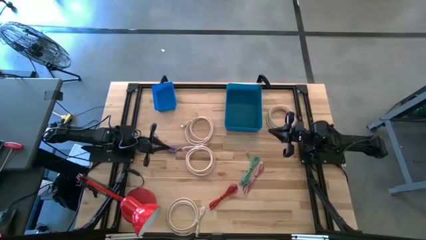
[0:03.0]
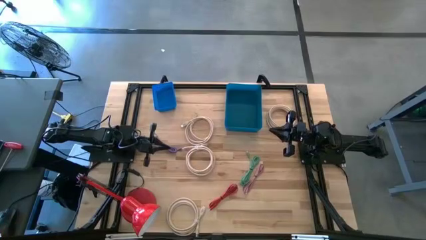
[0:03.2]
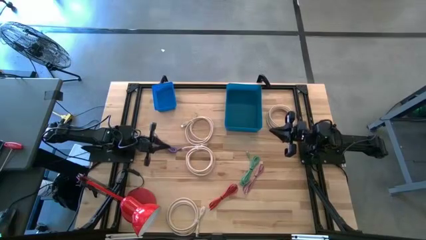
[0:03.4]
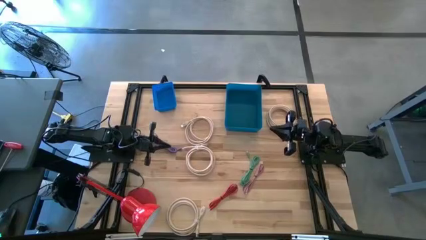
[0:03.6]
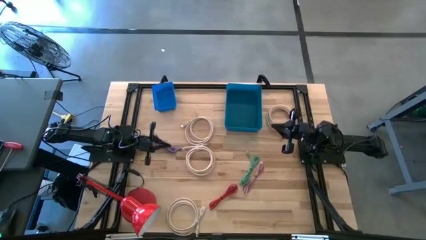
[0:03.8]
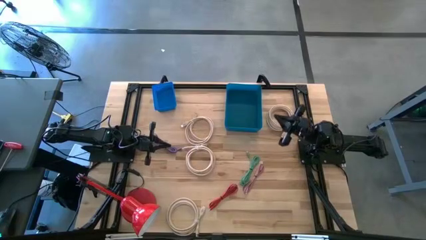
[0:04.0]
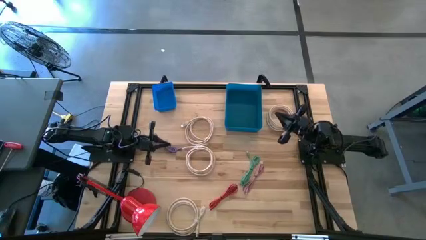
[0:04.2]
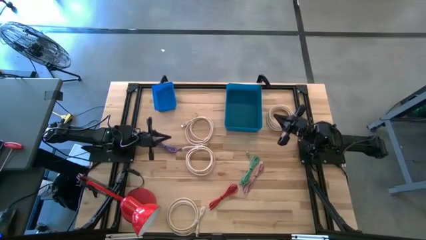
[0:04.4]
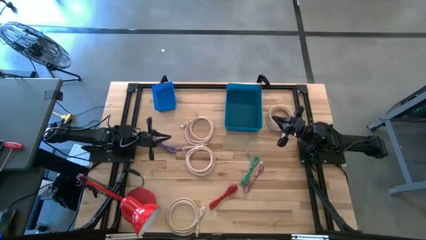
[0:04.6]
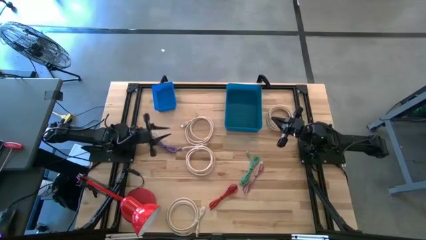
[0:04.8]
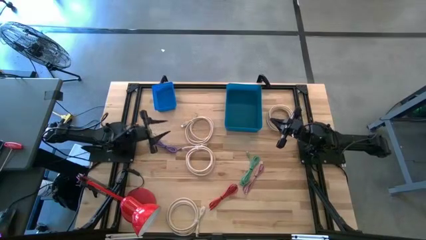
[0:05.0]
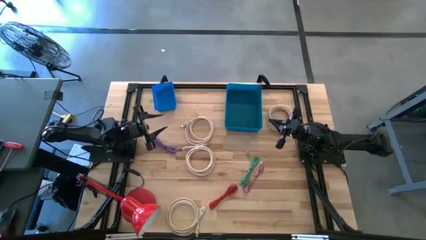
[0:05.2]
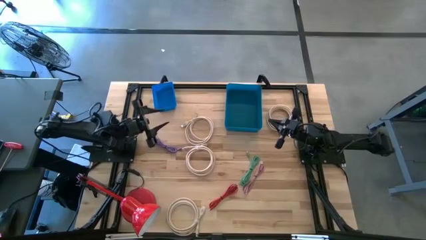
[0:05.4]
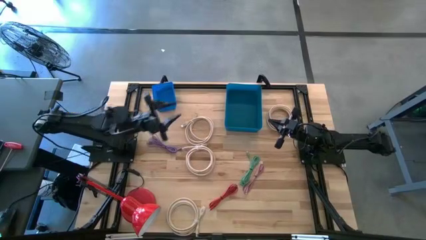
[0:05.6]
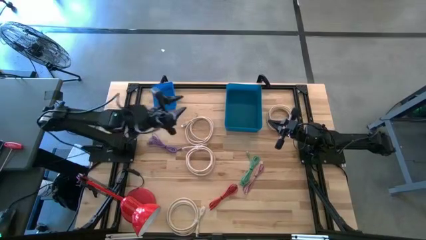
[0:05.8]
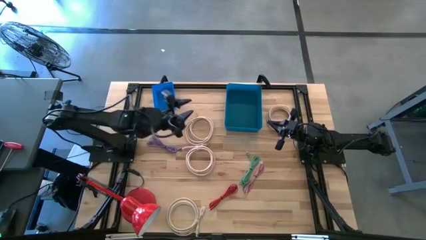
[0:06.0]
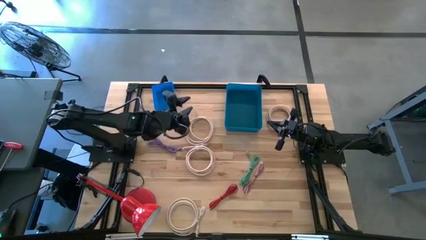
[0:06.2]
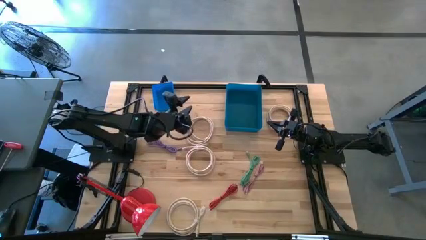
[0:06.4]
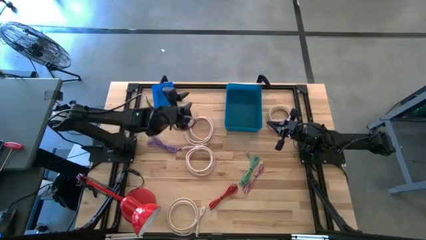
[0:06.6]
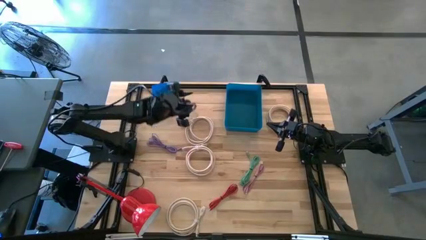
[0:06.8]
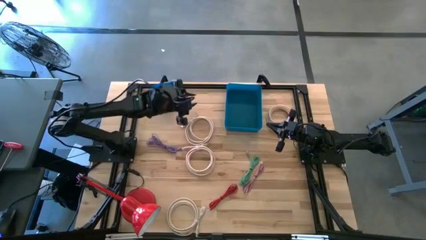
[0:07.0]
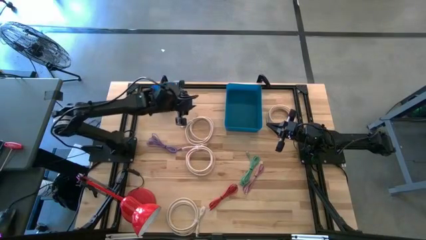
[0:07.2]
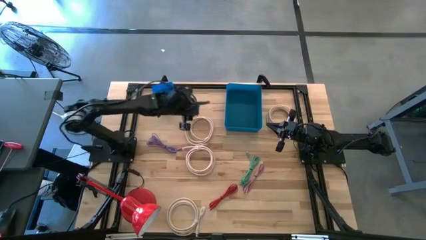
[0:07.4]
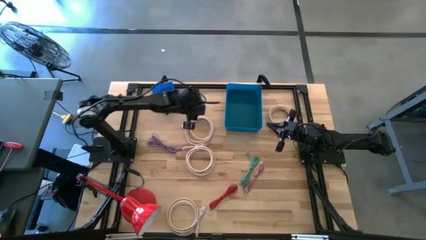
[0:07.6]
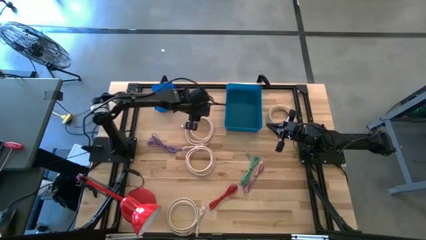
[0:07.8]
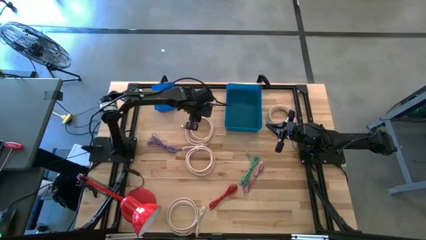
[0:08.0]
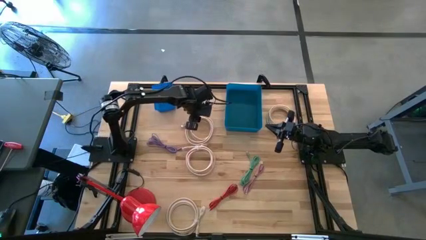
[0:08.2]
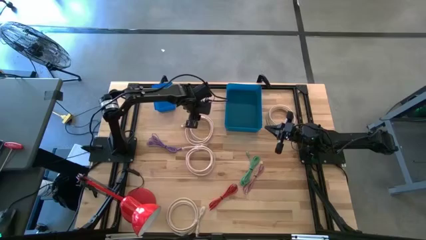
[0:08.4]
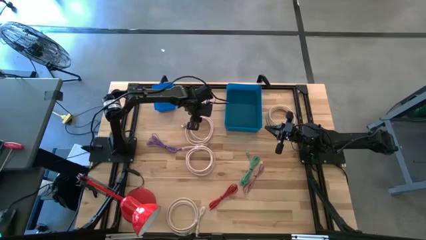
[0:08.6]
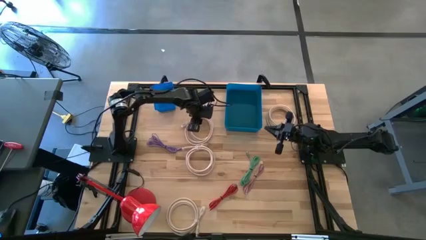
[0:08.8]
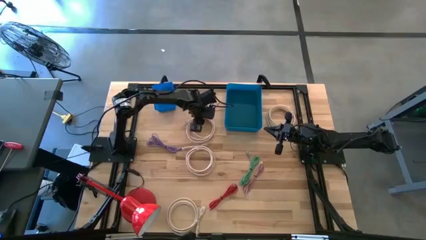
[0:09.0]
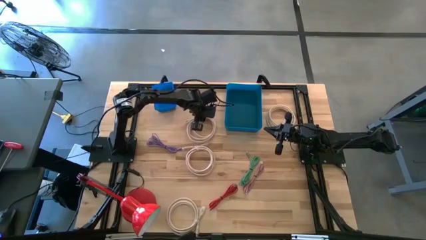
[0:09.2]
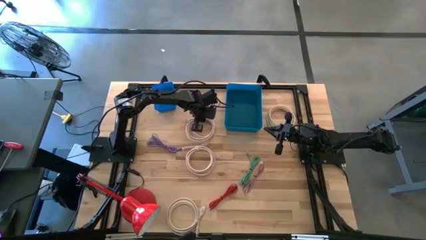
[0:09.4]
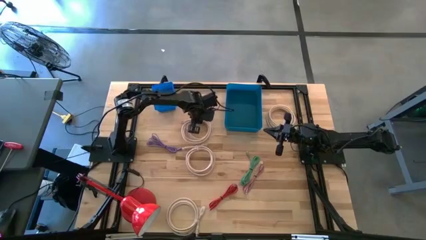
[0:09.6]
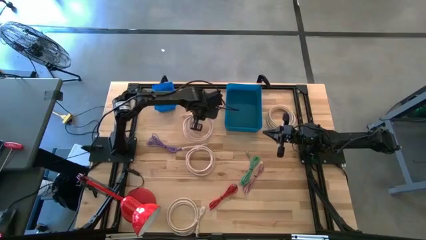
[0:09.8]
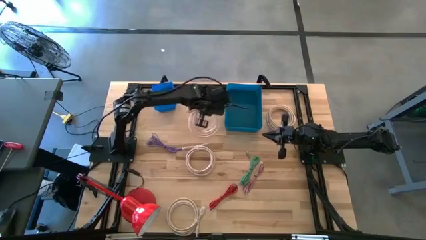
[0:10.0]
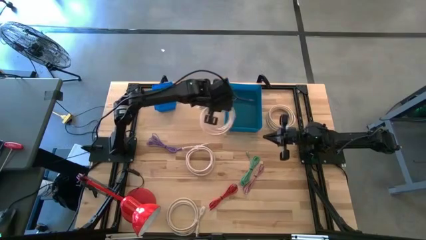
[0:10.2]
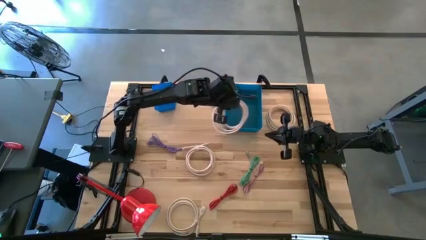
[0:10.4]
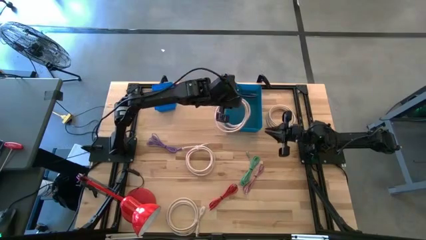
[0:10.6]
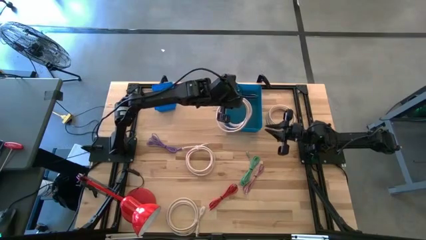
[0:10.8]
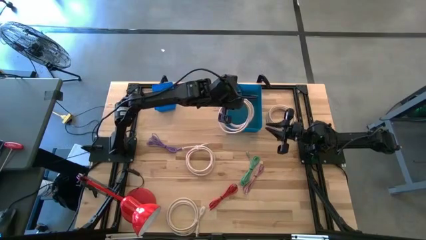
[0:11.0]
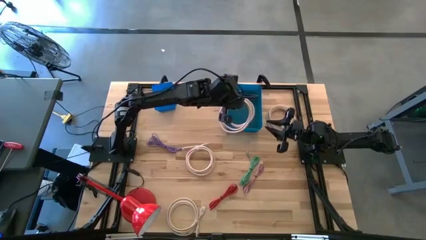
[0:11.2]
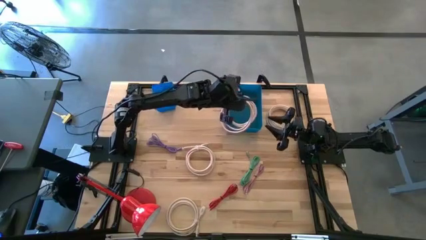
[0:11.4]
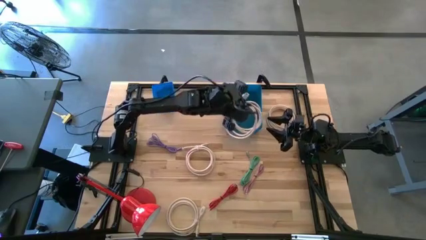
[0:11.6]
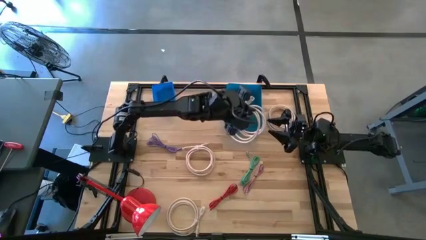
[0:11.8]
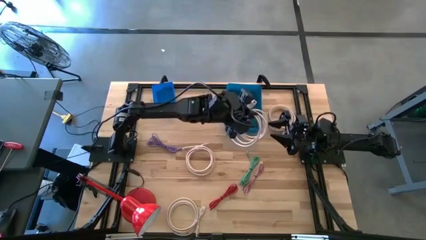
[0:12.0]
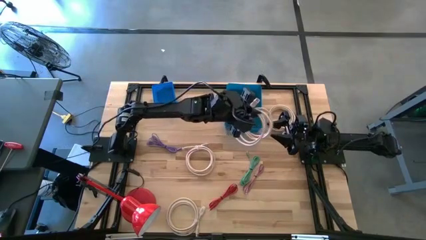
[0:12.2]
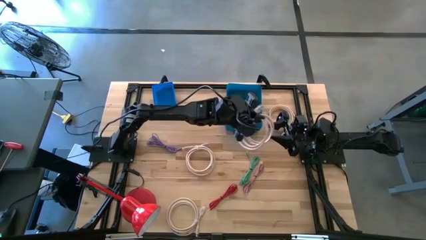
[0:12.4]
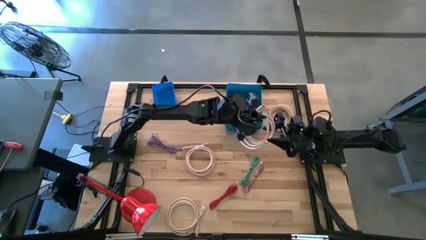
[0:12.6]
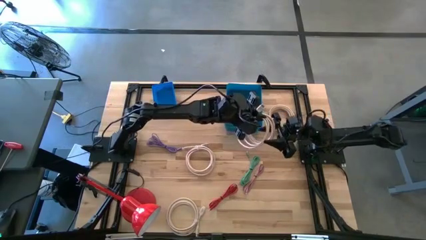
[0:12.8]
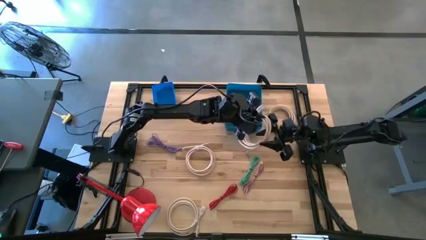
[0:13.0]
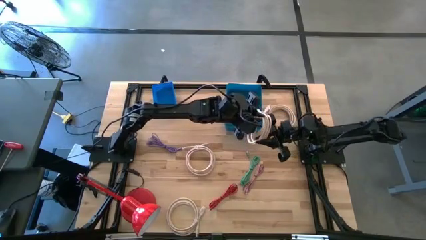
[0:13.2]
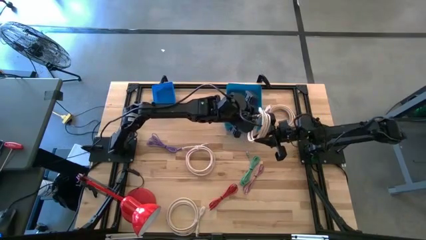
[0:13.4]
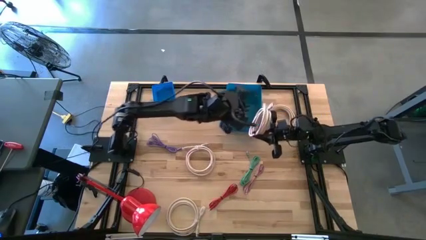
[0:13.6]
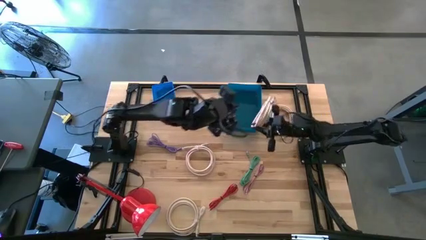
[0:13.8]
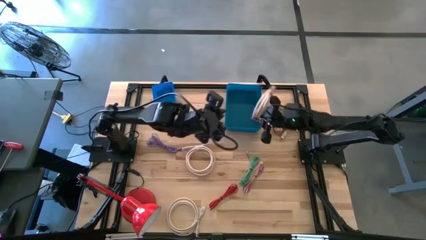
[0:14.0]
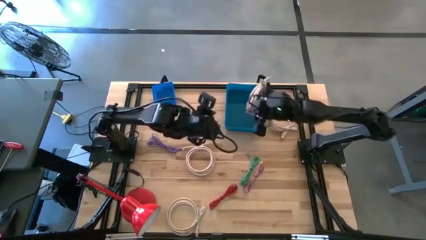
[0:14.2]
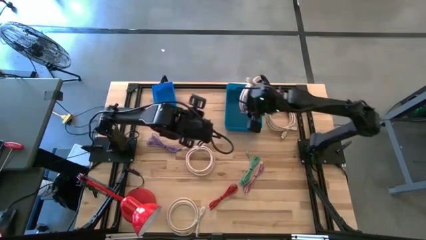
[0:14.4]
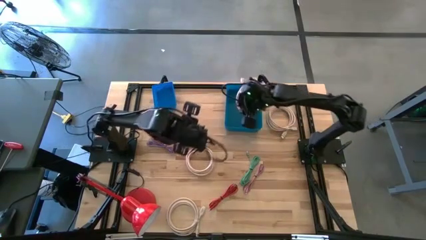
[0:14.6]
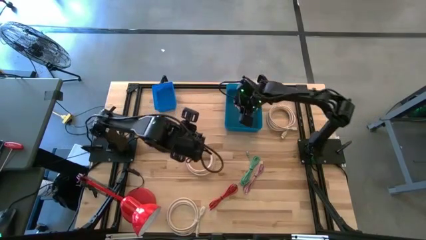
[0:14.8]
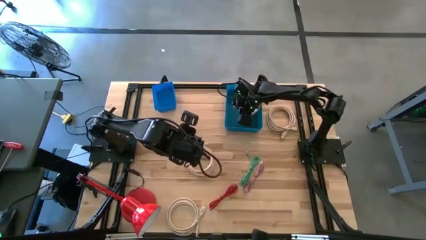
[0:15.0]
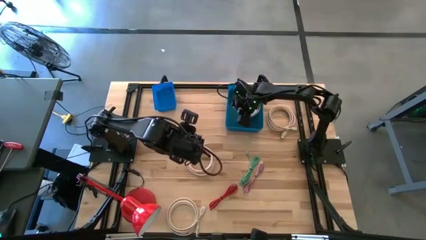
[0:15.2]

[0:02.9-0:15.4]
Task: Pick & Place USB Port
Put the white HDMI cable into the dark blue bin
